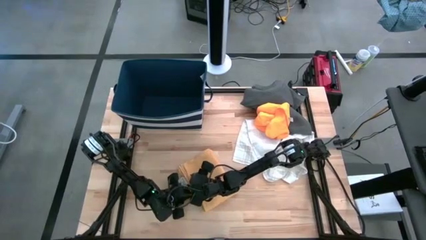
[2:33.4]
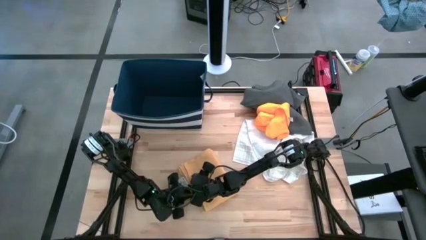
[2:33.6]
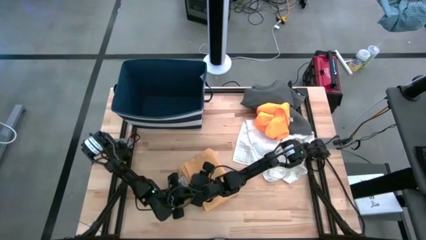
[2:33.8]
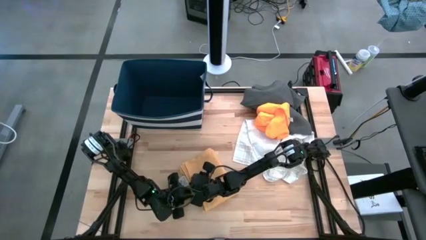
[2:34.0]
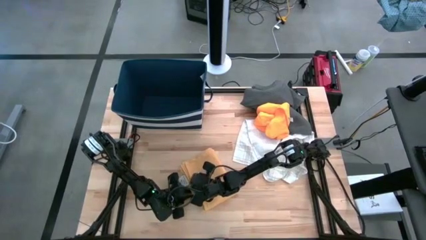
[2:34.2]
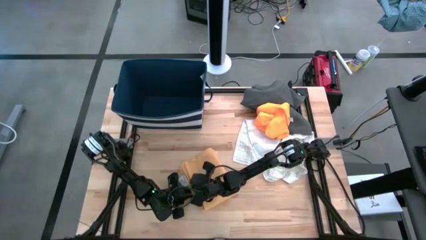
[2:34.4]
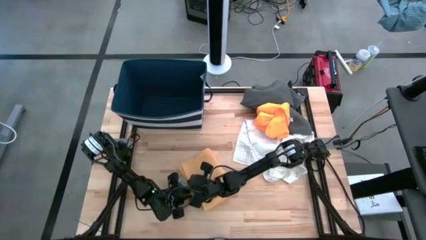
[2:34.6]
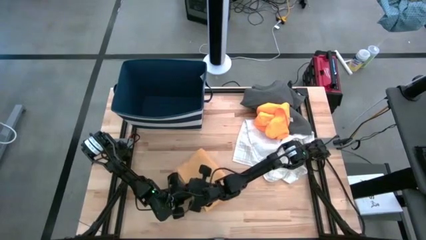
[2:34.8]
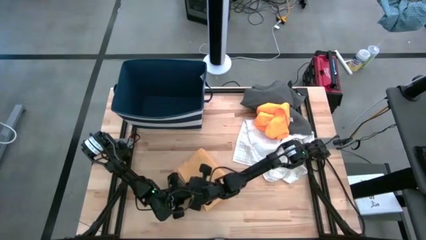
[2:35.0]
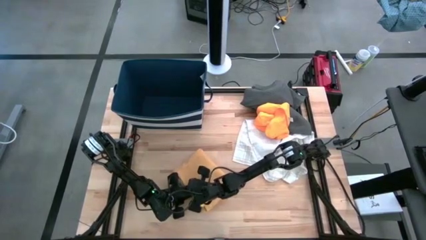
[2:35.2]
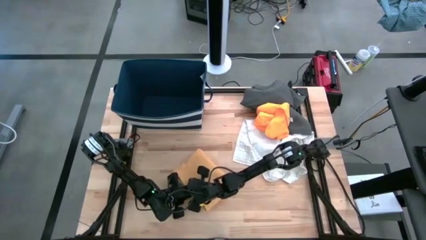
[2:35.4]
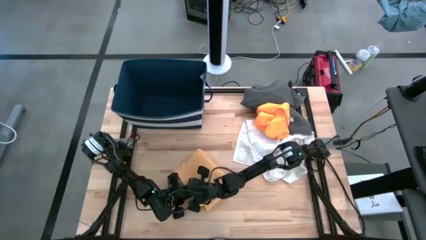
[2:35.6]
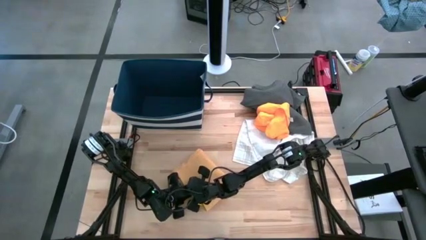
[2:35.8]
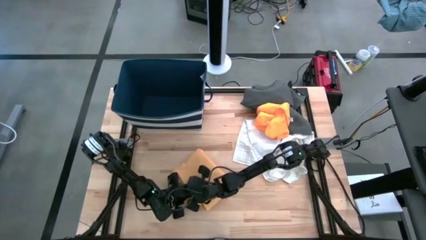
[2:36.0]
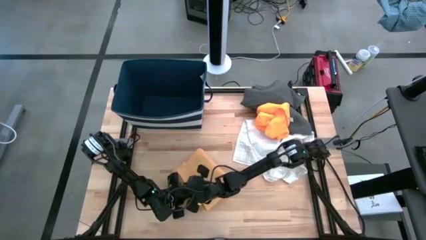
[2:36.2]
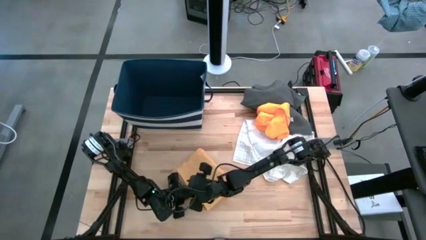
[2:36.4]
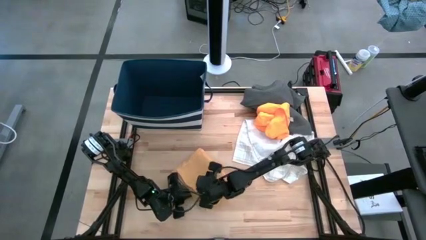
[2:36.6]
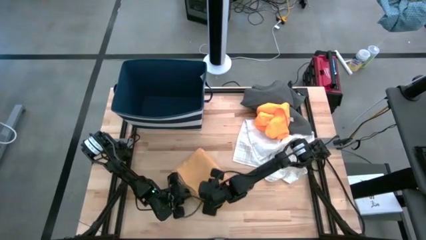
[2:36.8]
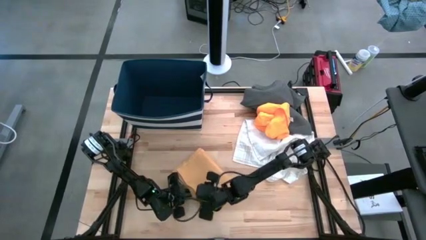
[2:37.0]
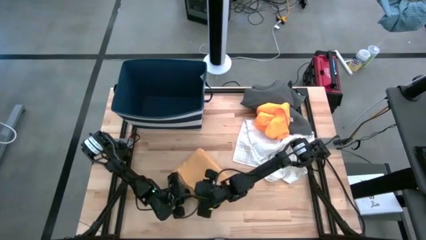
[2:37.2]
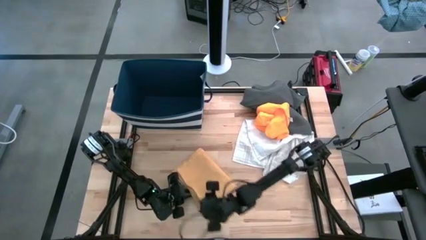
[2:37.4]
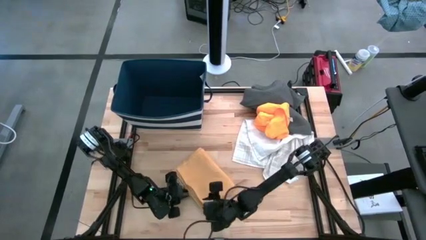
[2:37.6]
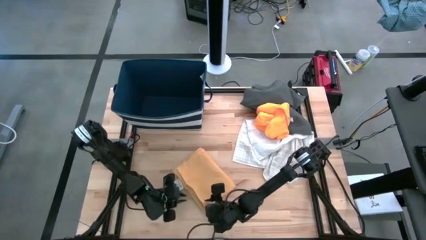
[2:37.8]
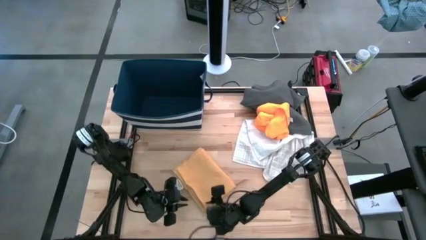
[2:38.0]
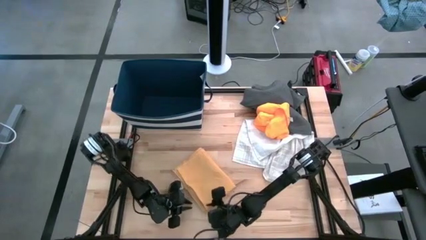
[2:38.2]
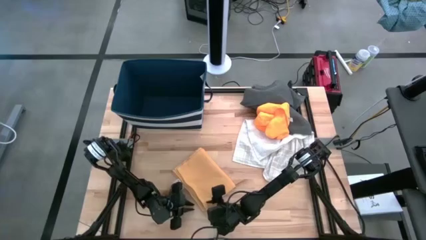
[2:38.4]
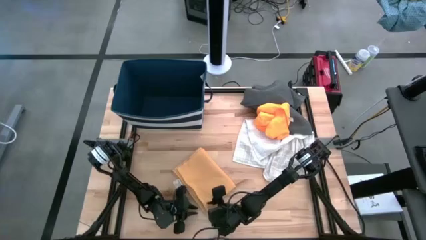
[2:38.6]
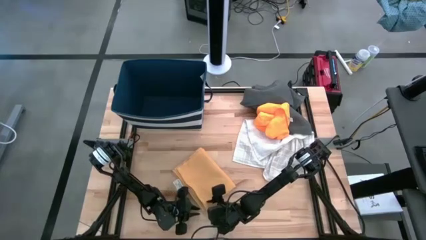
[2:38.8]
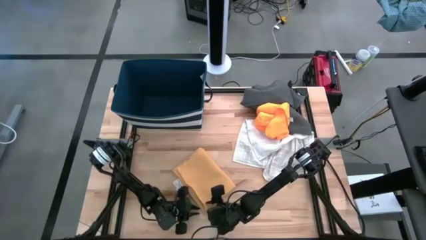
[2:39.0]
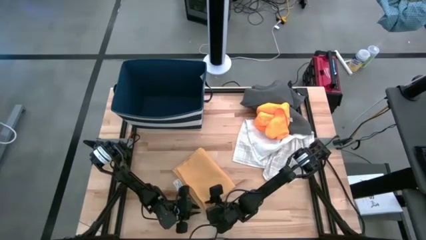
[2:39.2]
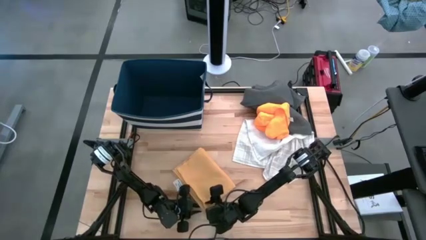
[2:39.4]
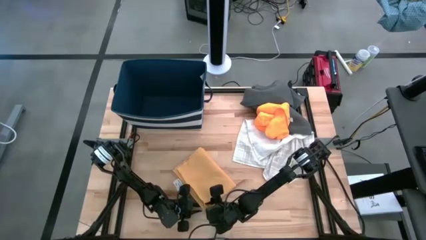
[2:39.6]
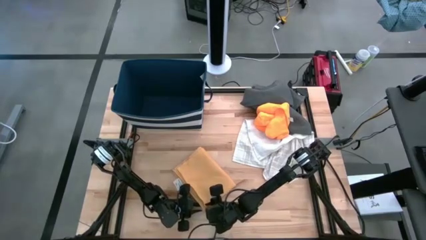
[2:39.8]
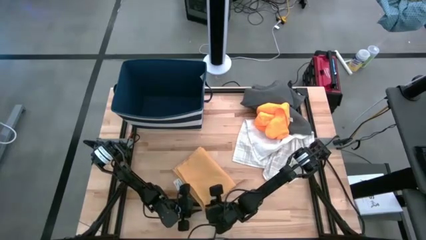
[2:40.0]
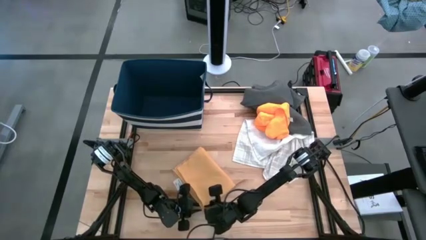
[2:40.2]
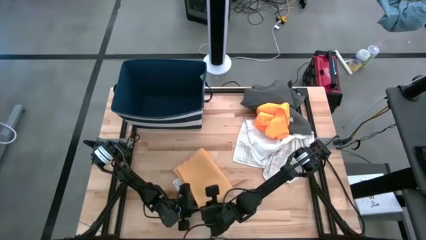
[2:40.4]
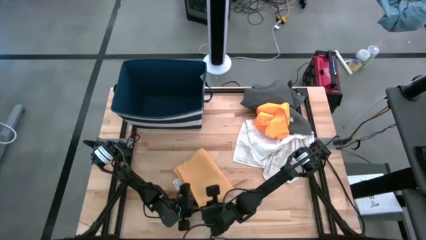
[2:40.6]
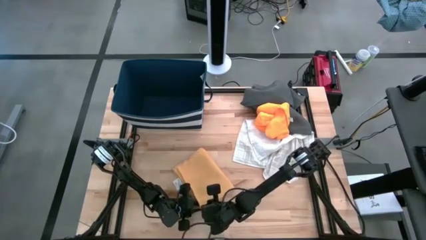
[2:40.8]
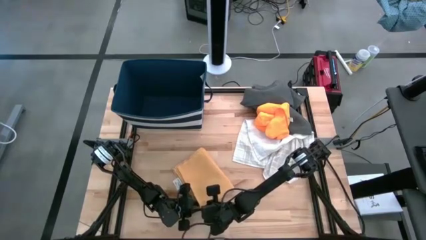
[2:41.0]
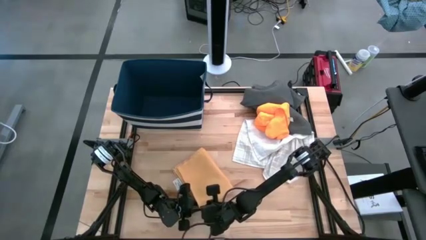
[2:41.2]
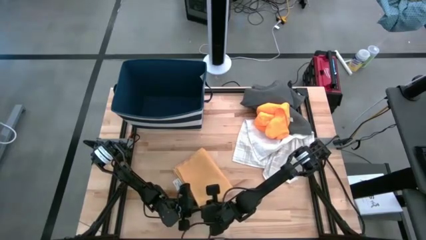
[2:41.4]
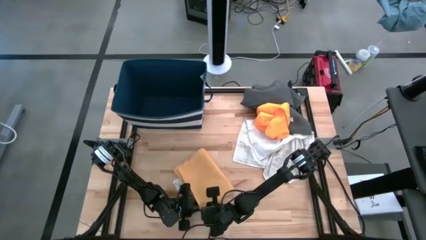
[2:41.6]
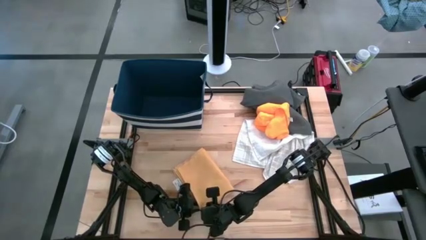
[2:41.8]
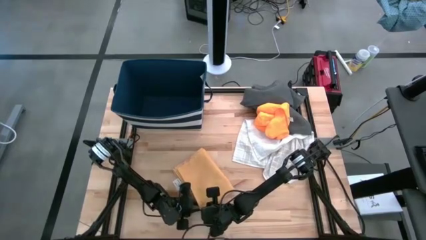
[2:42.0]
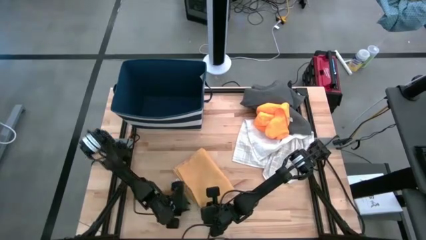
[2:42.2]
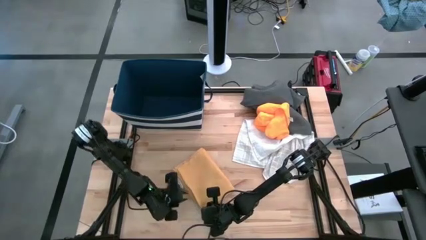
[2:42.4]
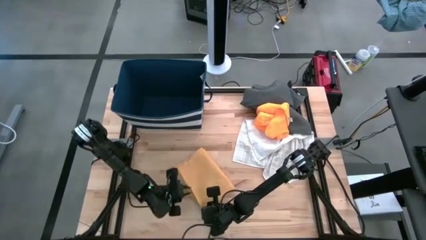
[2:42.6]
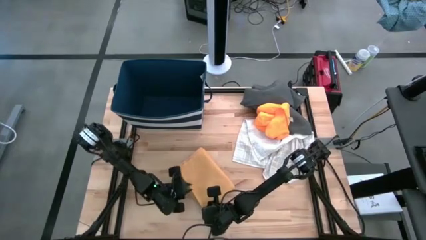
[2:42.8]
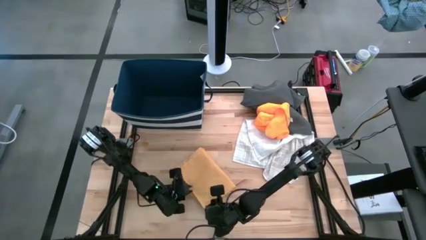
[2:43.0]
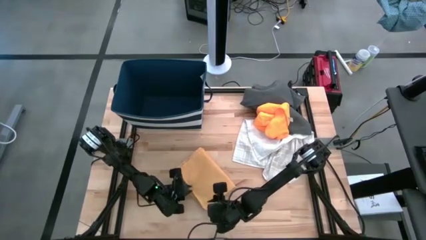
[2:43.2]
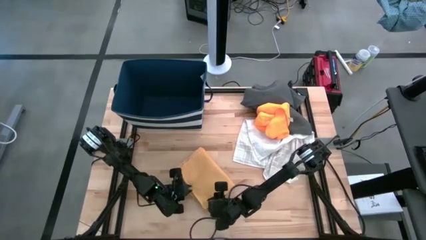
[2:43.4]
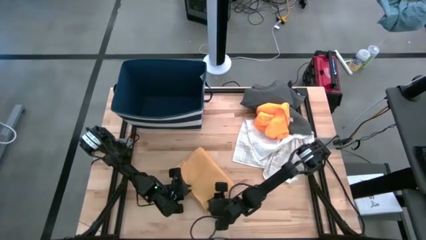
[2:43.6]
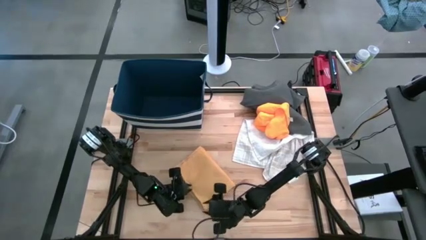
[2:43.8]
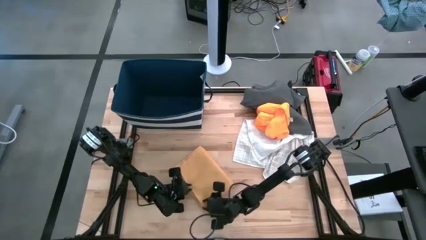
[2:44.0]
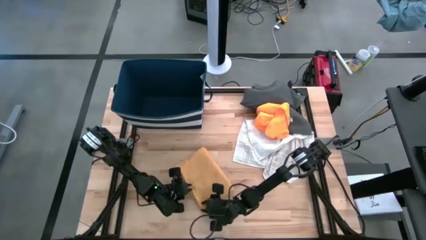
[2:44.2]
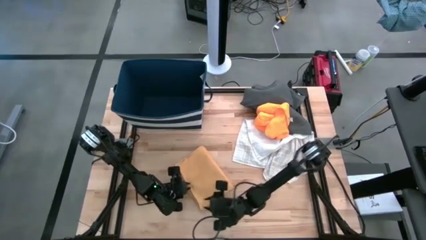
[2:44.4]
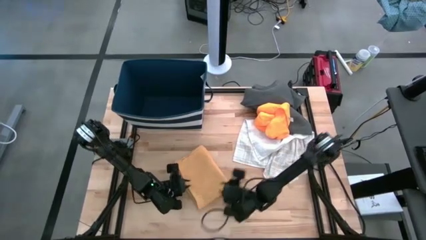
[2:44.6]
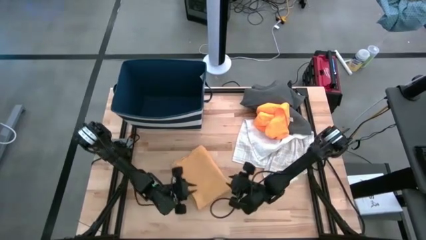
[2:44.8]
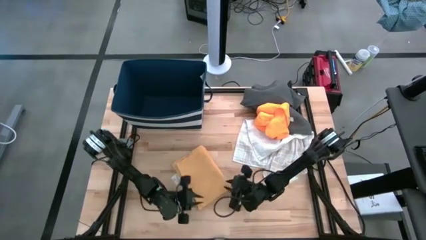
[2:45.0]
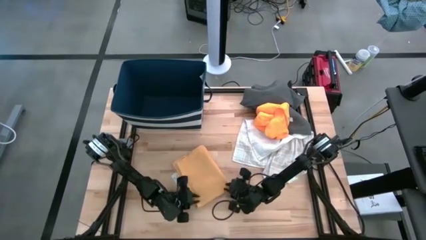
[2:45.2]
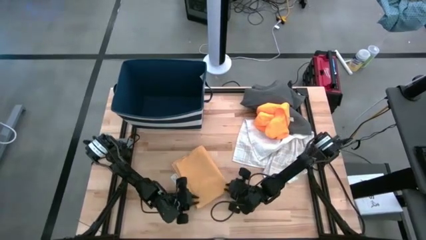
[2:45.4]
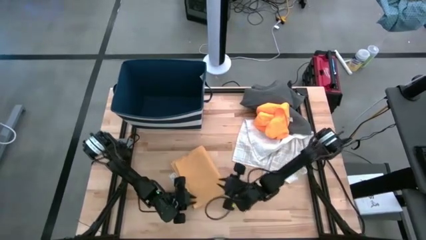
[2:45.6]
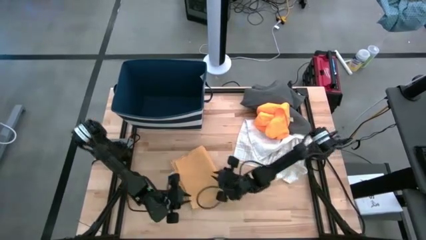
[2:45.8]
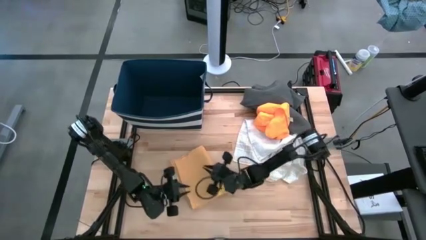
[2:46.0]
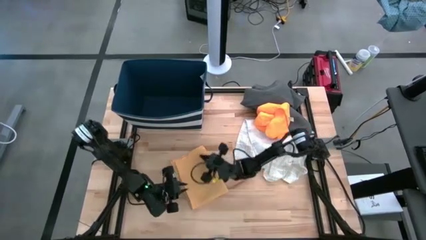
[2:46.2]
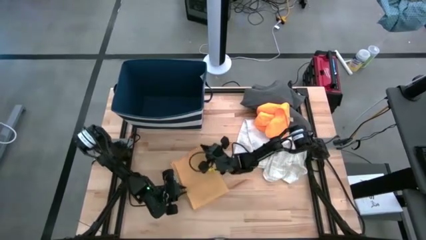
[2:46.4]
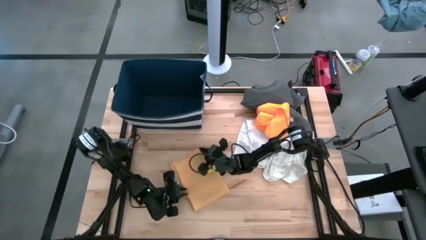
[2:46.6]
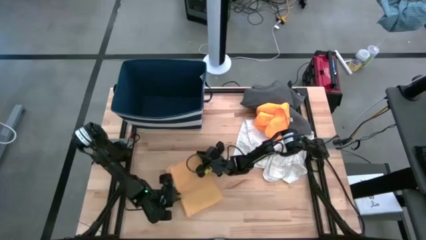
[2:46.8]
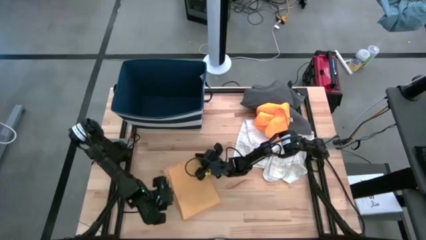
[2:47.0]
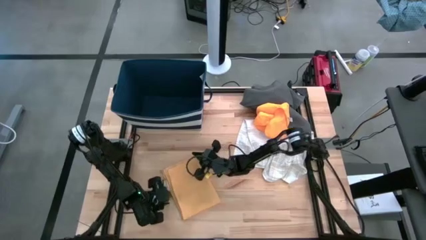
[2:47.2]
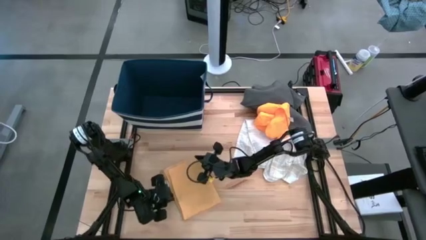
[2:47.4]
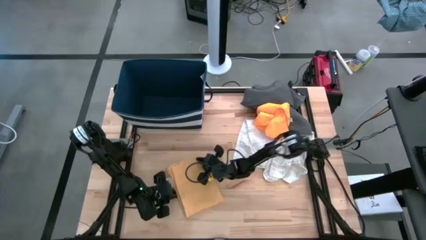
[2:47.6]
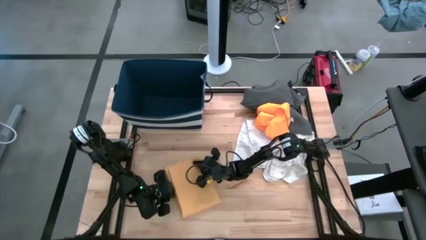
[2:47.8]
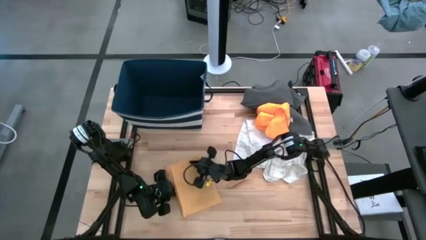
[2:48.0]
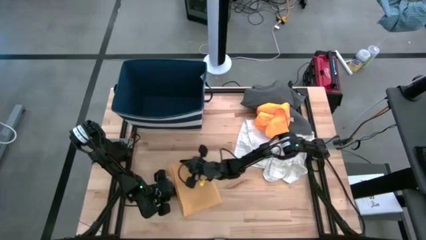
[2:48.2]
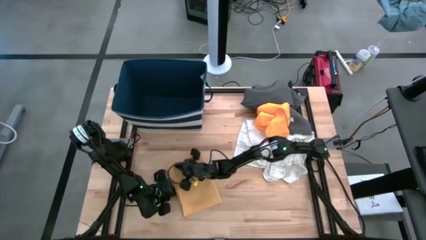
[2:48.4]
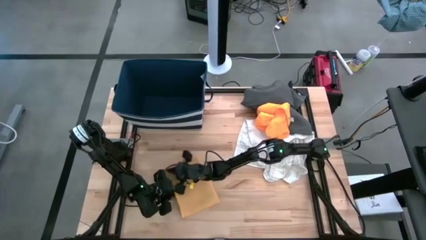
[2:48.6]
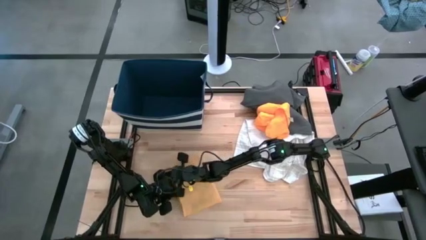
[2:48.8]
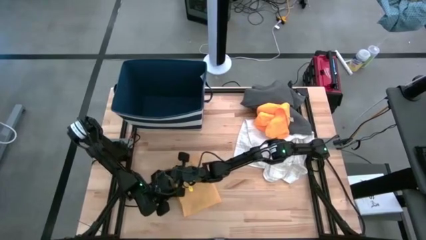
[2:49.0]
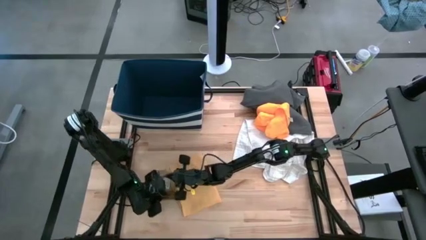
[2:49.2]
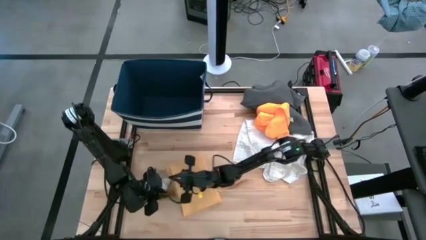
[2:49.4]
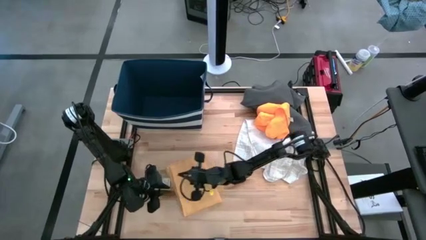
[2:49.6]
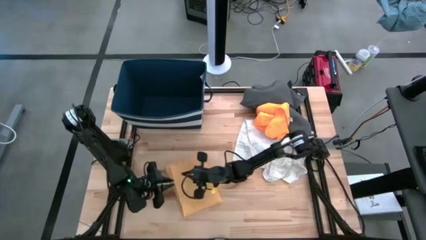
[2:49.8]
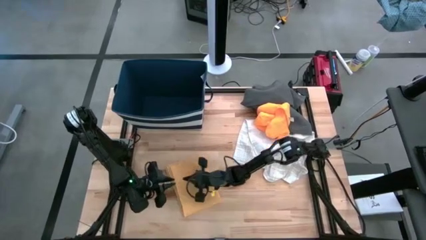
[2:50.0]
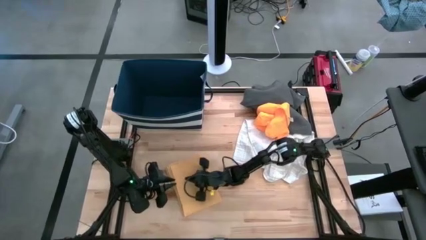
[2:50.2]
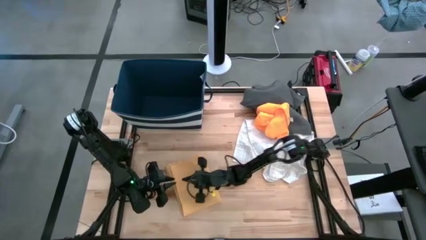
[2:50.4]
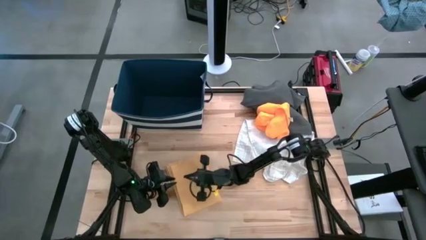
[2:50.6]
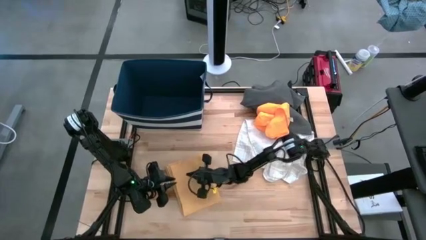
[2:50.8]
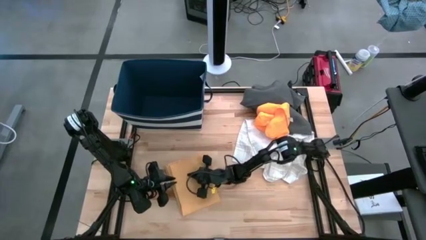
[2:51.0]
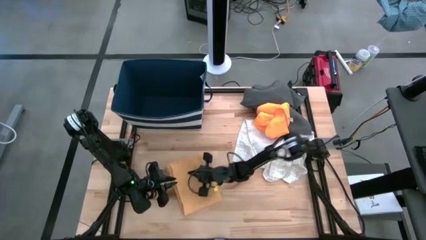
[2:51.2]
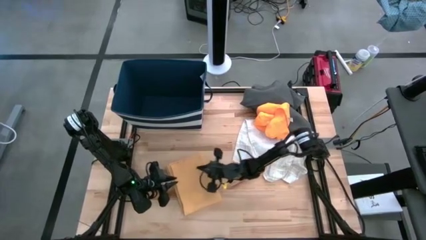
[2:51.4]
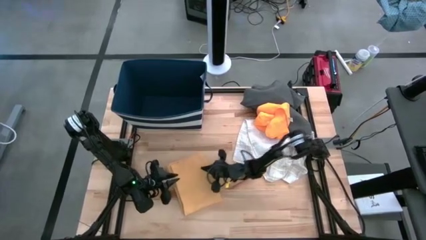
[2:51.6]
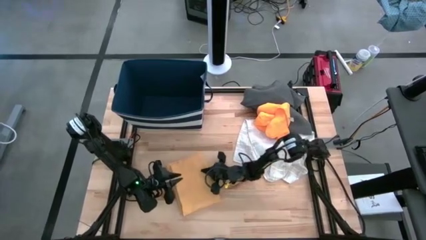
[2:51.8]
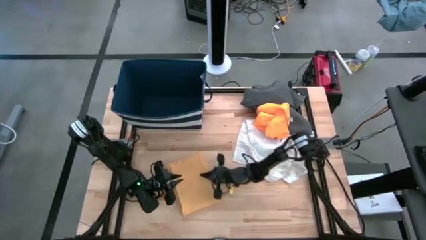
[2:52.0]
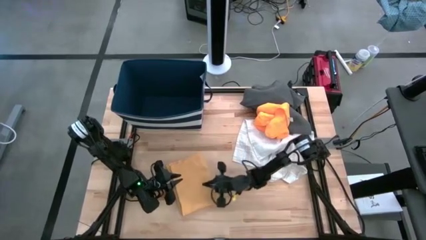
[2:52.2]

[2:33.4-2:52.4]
Task: Fold towel
Fold the yellow kitchen towel
